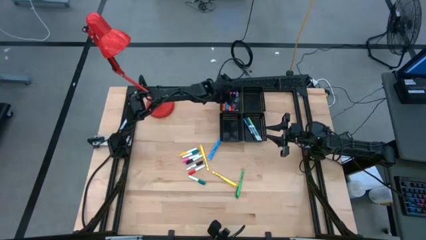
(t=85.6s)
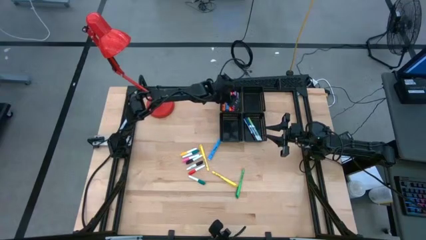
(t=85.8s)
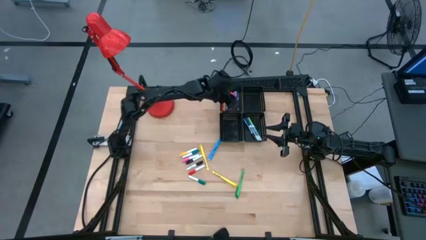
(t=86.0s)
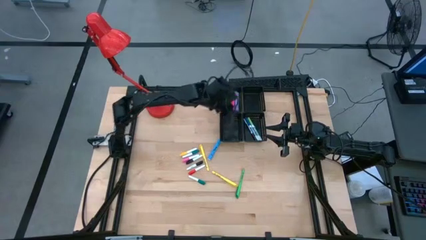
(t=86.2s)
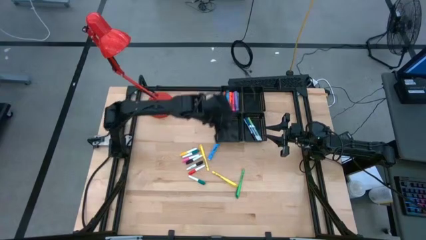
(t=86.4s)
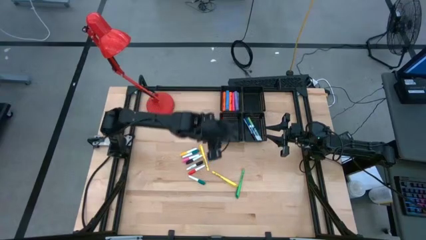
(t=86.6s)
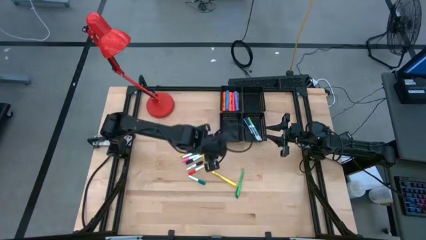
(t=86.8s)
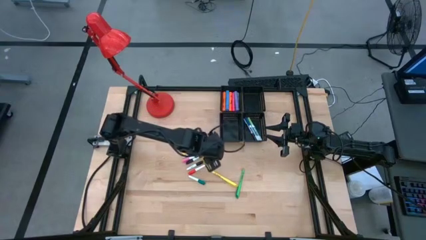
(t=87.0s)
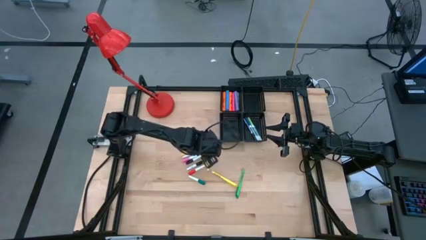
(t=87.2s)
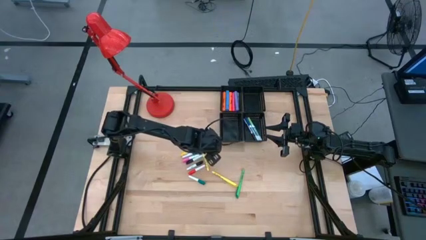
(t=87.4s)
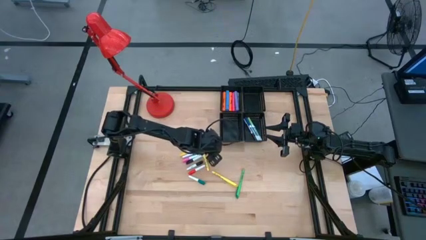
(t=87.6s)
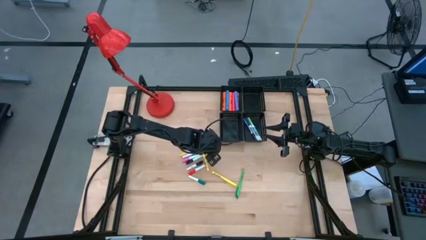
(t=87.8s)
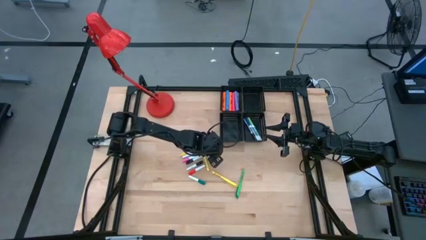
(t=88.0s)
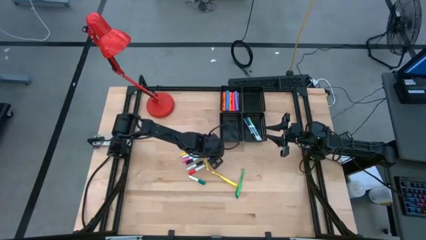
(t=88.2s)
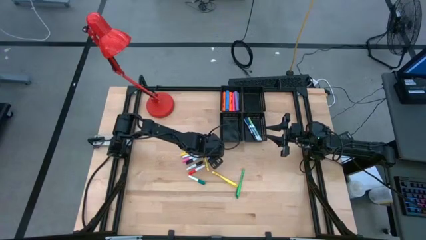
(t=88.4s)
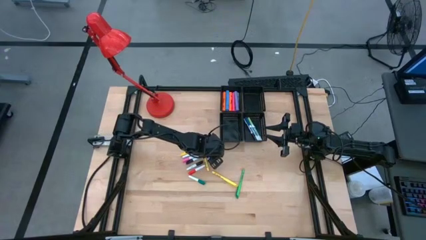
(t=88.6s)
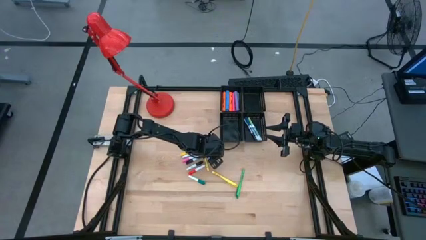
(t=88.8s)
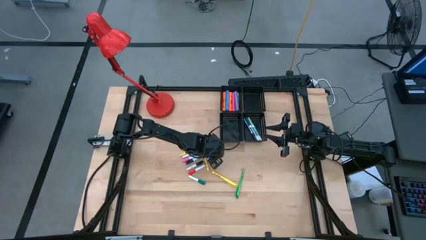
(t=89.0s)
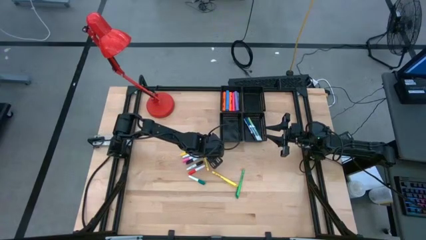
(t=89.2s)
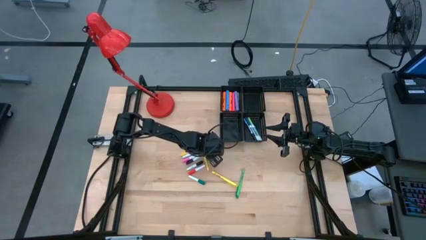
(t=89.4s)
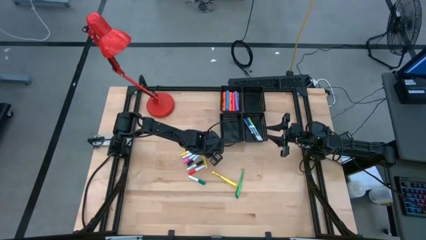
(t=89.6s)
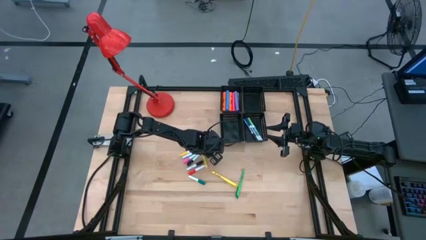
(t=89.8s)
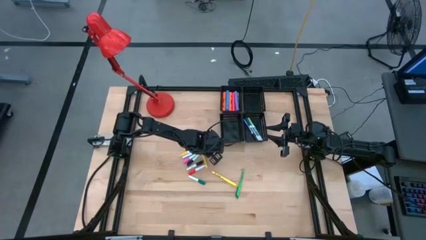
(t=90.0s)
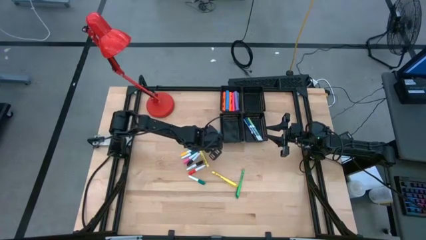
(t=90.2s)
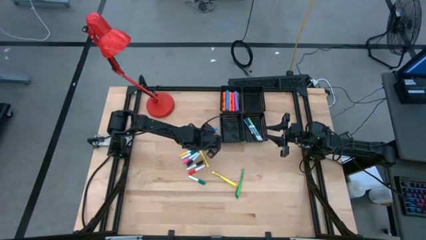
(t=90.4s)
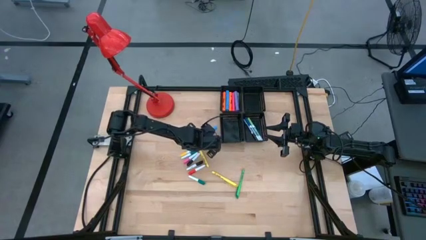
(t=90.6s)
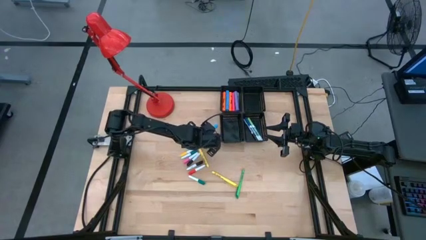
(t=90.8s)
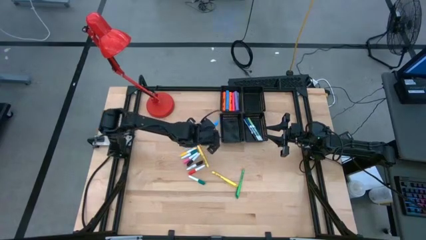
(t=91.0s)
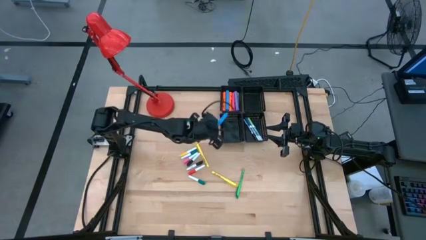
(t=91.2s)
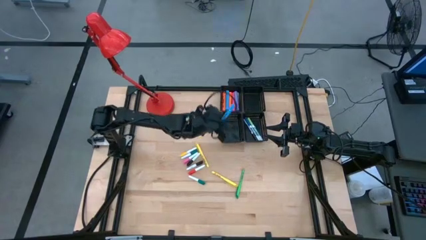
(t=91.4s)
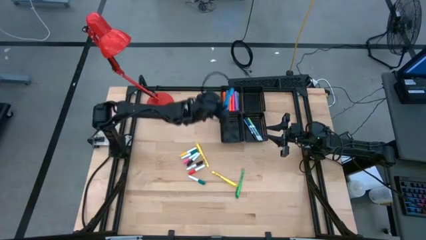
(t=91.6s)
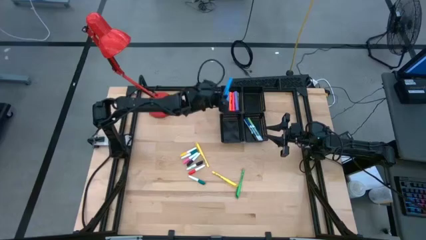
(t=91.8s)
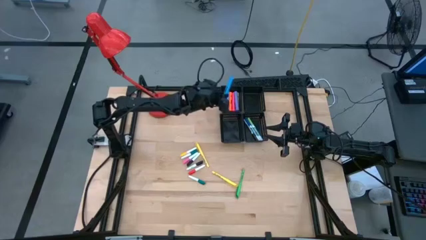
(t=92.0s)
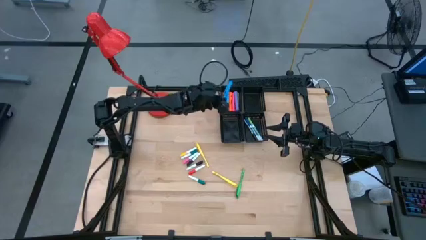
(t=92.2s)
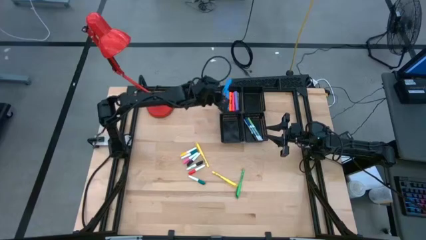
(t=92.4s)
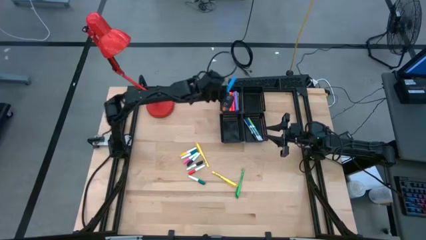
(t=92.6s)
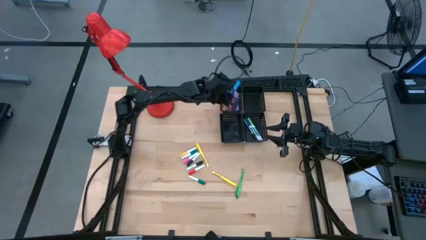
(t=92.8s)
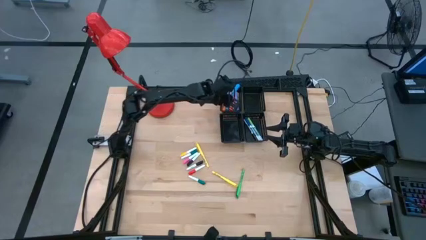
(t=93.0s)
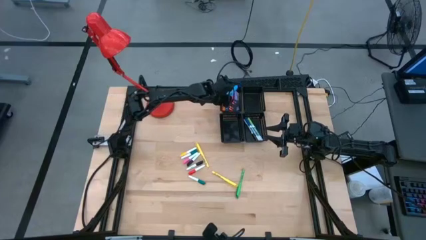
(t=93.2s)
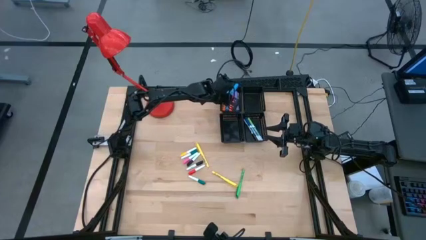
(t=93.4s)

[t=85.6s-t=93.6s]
Task: Pick & Place Markers
Put the blue highlighter pen into the top left black bin

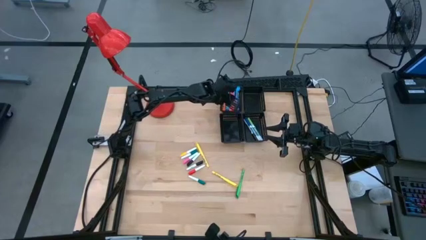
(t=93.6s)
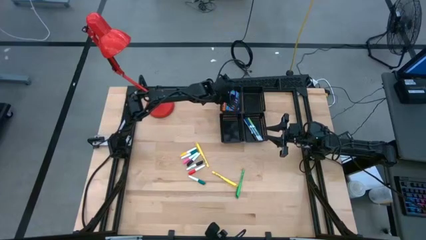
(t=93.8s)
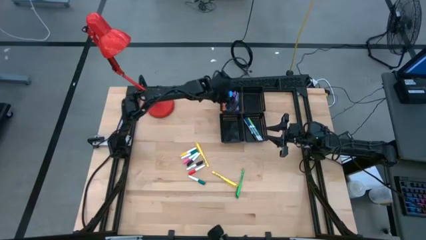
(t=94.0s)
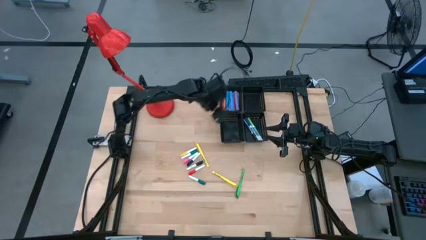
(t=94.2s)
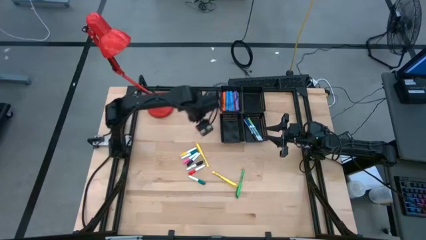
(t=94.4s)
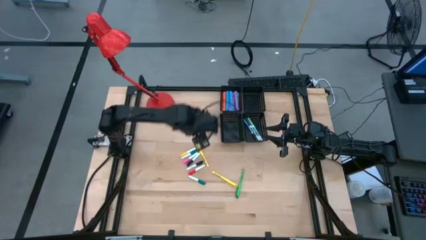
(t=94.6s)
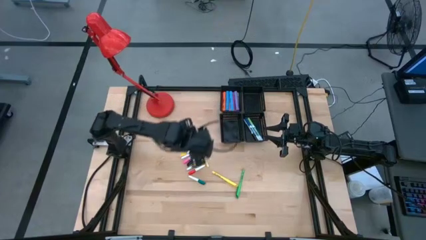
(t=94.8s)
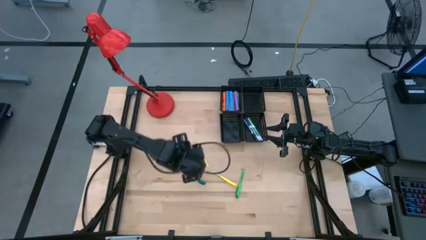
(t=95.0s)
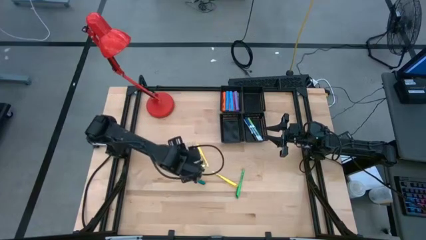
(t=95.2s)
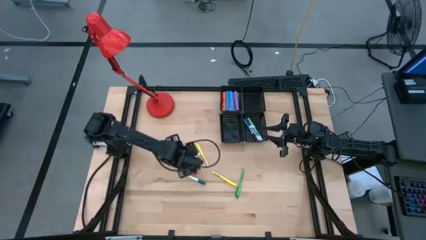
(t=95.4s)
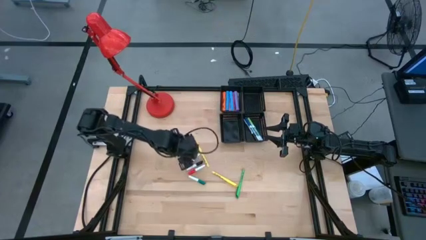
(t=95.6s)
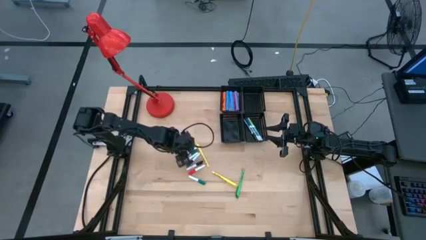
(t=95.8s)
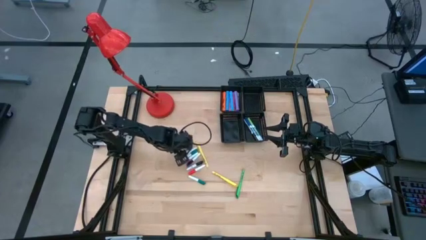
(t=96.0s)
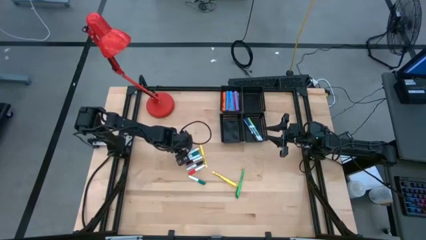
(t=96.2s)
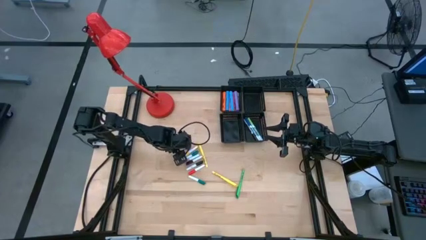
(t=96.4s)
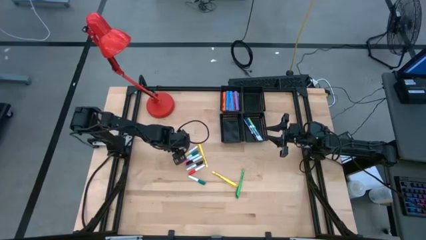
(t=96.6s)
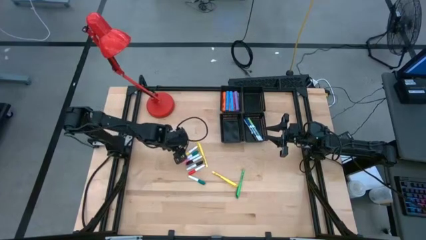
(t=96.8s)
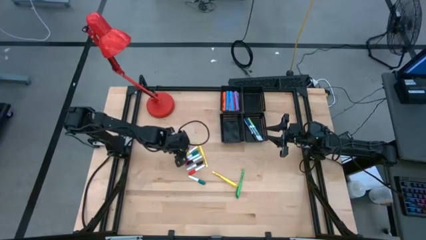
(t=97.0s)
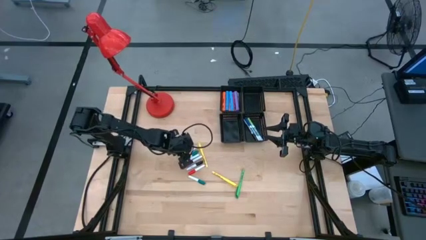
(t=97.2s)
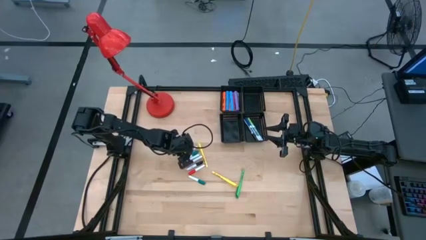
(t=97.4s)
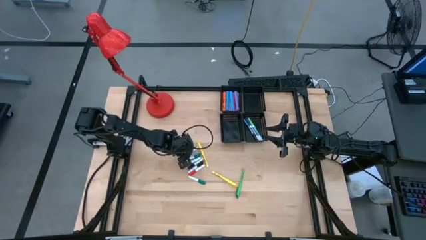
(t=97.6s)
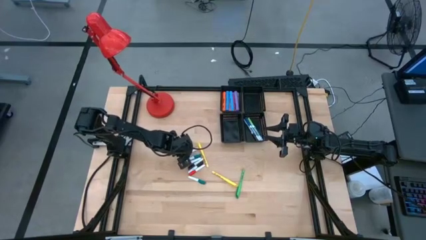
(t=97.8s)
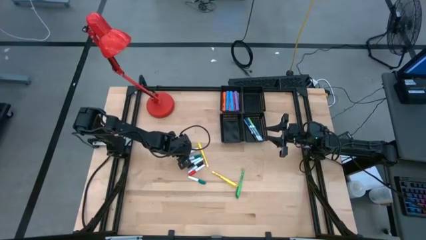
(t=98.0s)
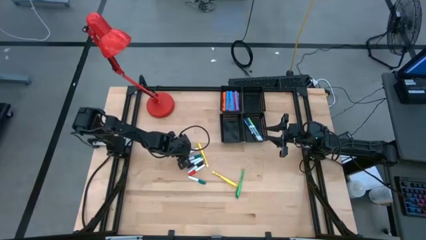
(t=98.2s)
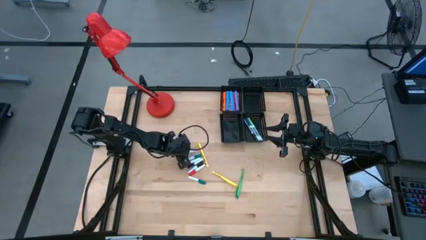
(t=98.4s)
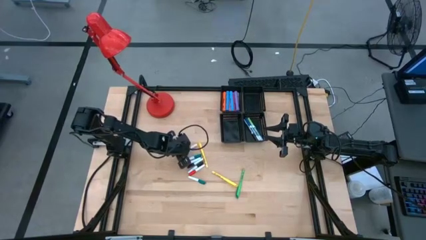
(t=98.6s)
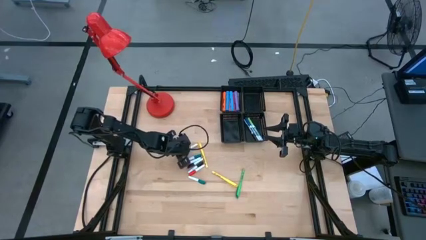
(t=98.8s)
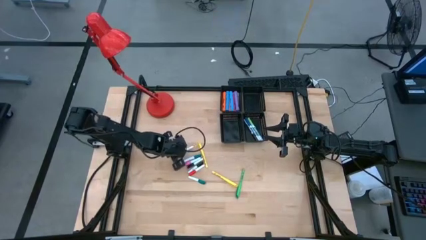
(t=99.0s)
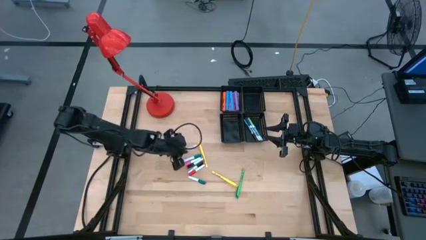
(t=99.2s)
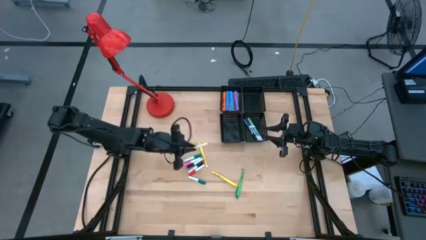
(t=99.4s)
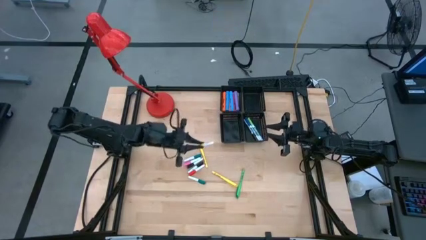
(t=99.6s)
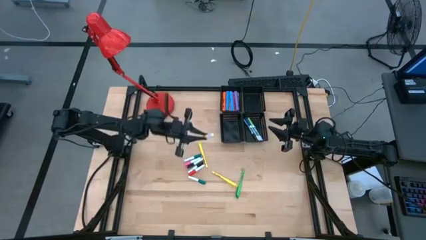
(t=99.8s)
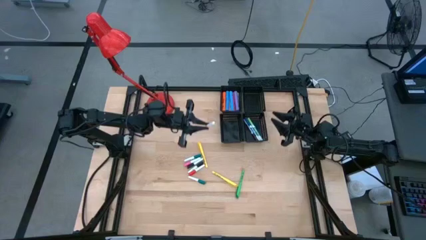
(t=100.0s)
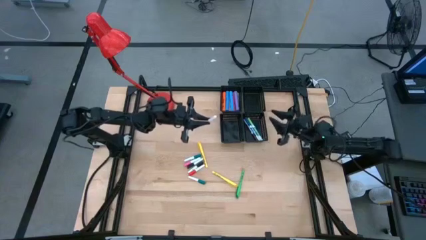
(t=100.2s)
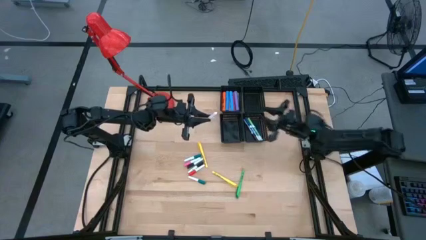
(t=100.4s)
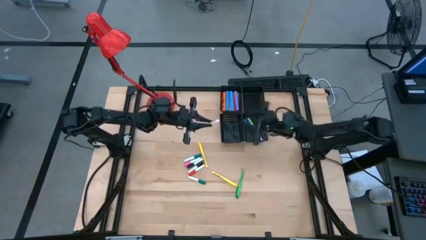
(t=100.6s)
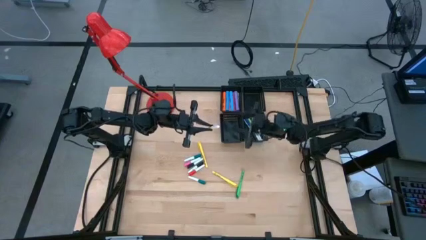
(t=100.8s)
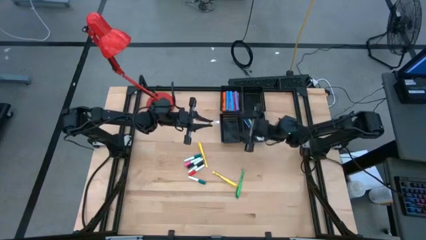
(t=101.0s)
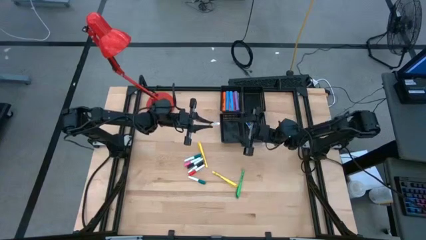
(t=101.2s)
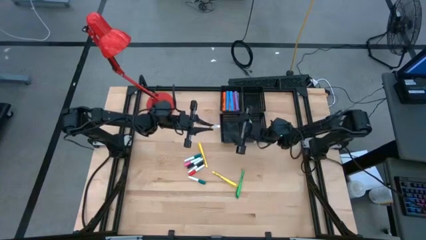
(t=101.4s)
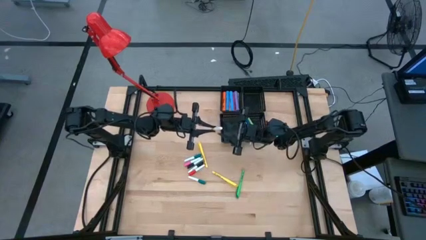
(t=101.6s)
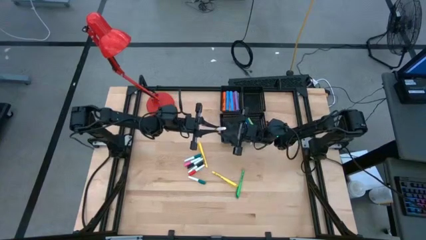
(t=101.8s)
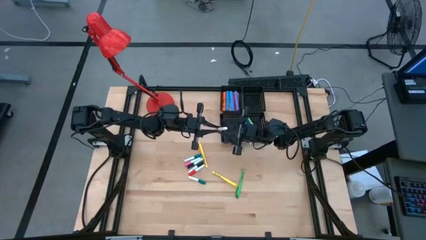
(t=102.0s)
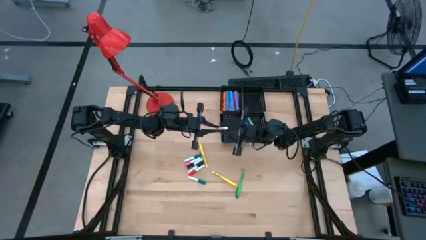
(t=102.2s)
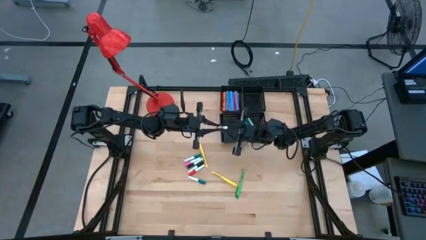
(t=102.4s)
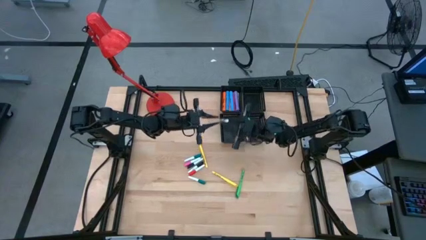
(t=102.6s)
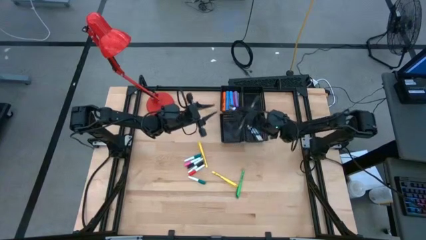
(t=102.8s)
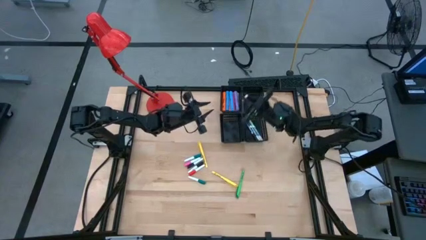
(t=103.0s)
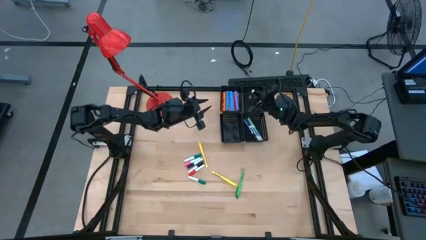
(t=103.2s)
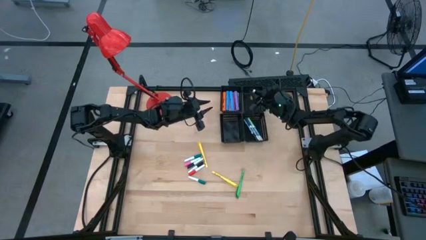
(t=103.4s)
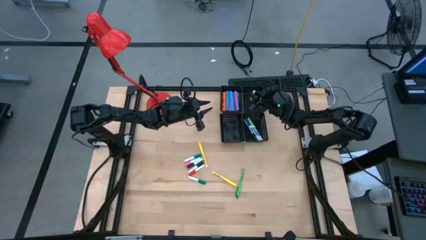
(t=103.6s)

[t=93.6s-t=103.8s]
Put the yellow and white highlighter pen into the top right black bin
